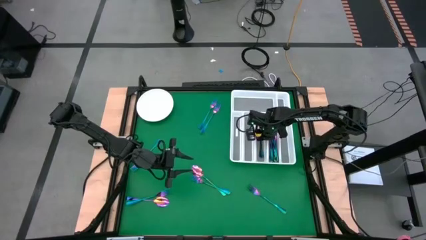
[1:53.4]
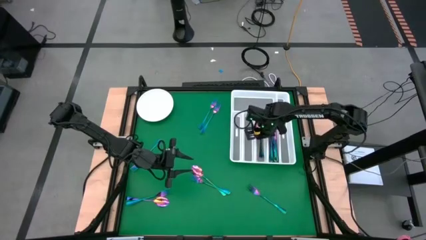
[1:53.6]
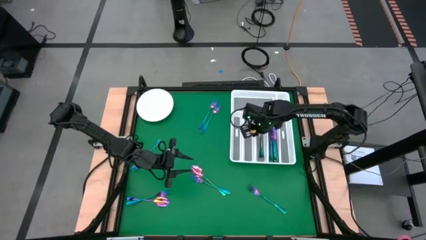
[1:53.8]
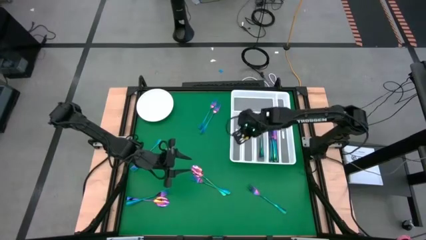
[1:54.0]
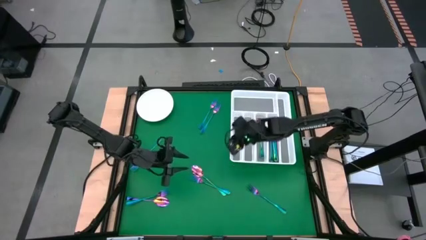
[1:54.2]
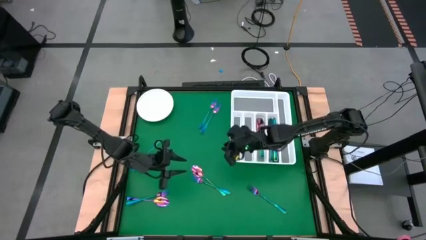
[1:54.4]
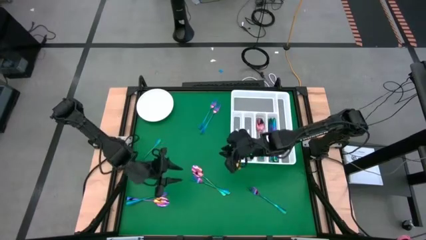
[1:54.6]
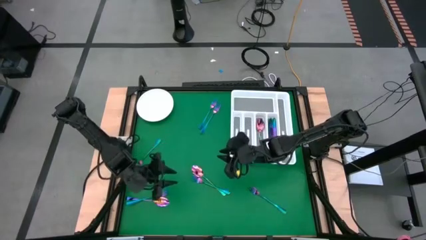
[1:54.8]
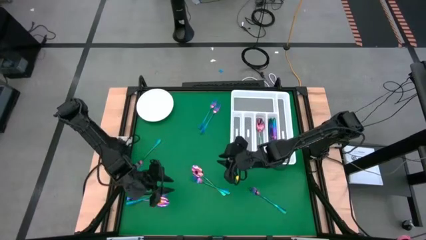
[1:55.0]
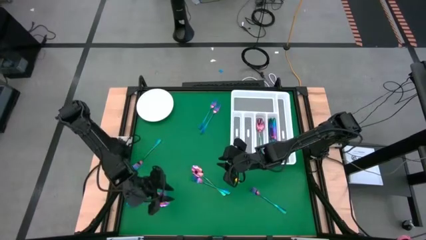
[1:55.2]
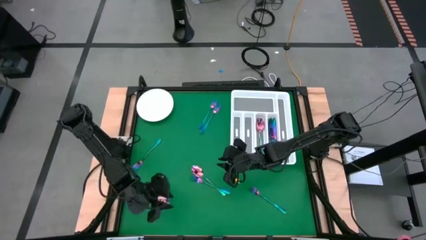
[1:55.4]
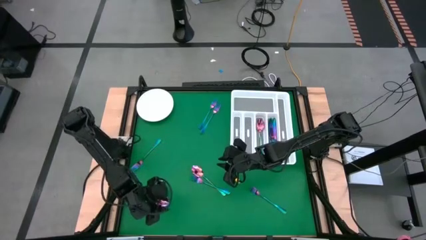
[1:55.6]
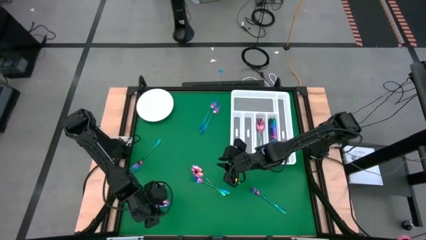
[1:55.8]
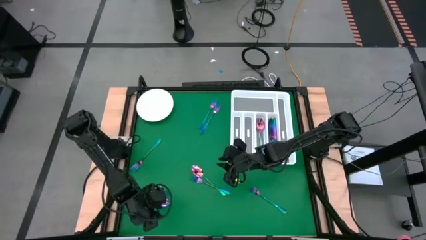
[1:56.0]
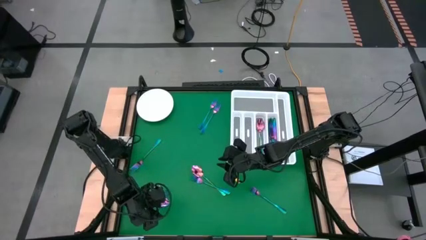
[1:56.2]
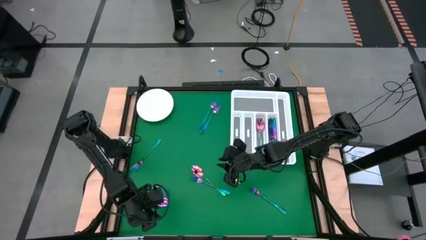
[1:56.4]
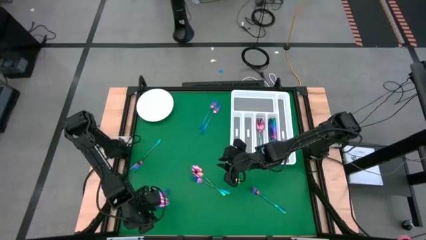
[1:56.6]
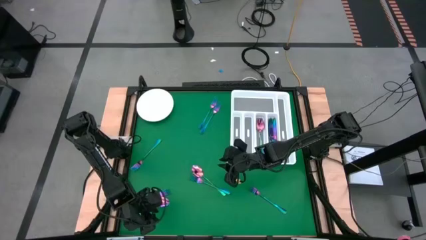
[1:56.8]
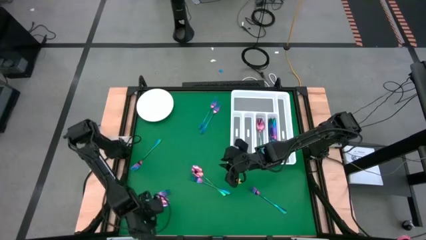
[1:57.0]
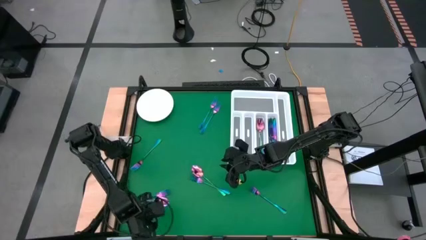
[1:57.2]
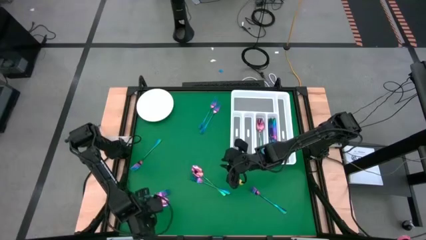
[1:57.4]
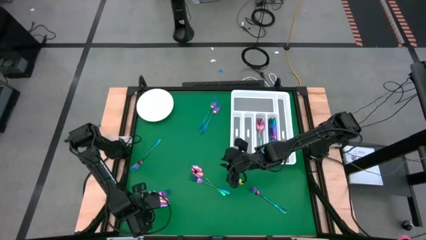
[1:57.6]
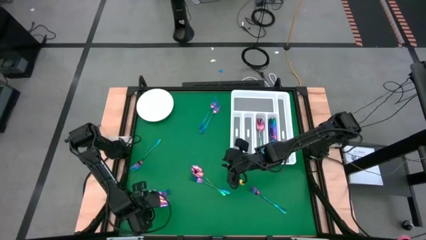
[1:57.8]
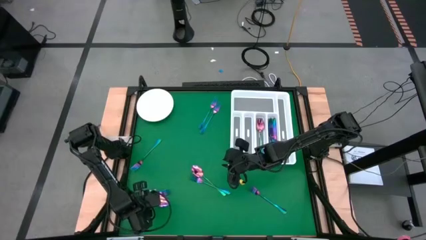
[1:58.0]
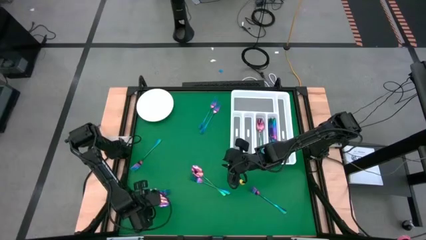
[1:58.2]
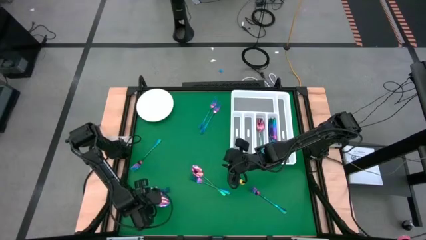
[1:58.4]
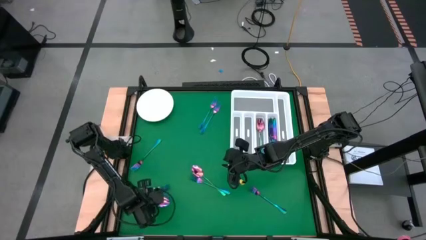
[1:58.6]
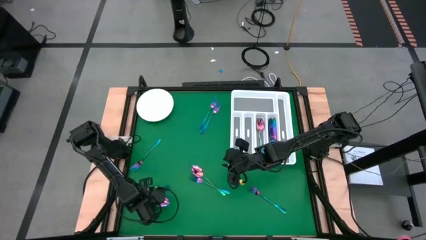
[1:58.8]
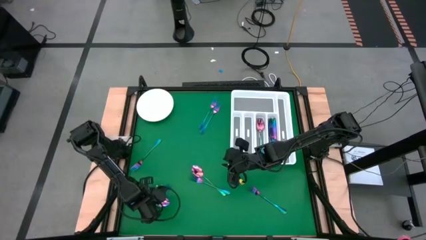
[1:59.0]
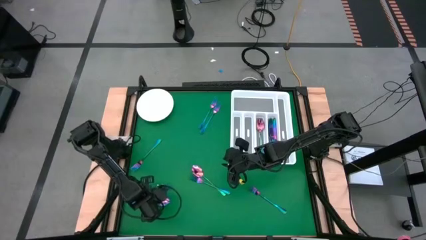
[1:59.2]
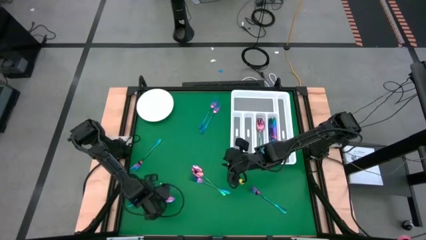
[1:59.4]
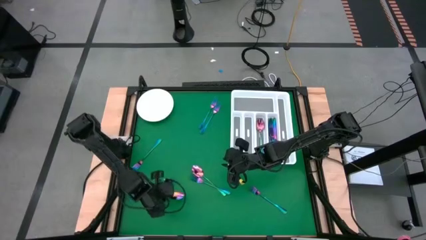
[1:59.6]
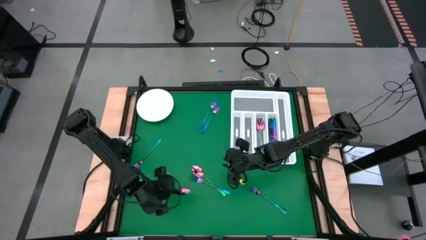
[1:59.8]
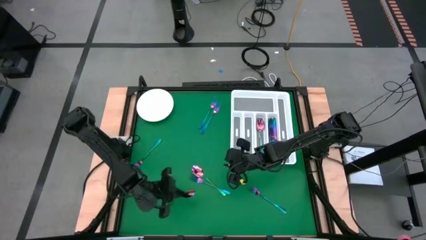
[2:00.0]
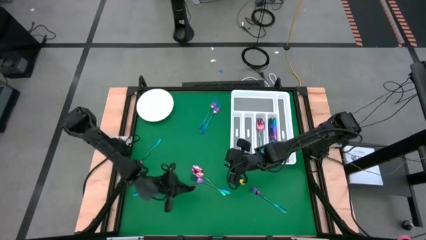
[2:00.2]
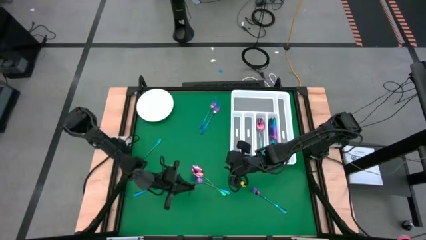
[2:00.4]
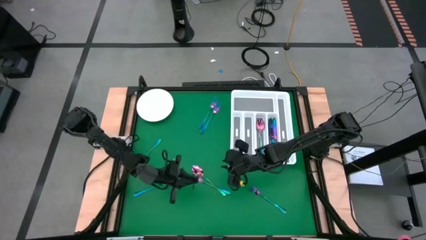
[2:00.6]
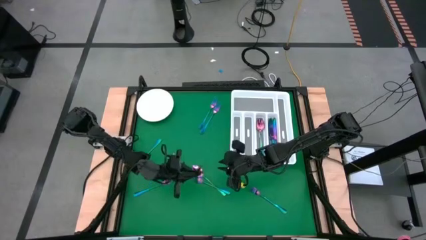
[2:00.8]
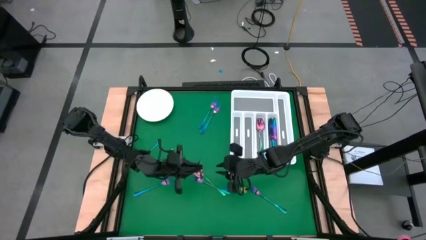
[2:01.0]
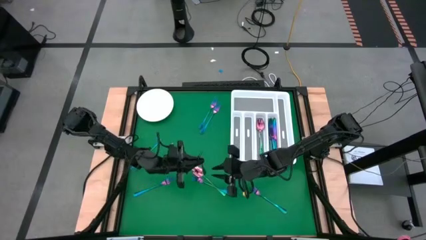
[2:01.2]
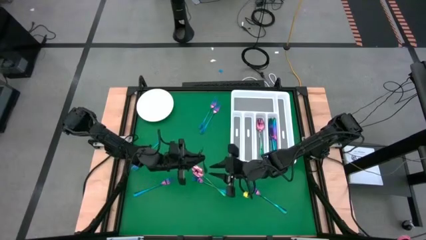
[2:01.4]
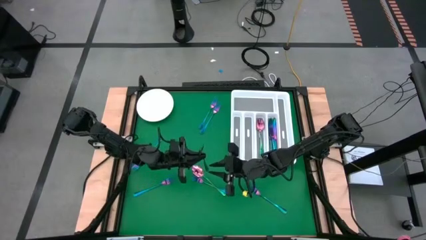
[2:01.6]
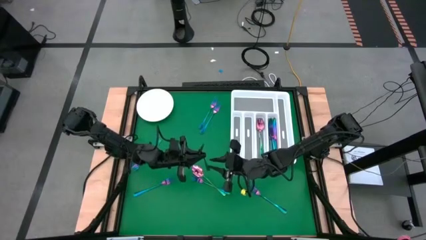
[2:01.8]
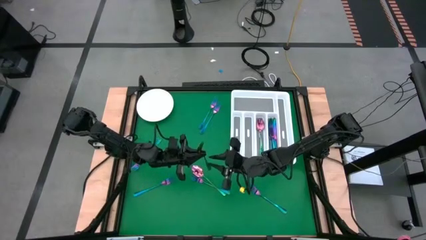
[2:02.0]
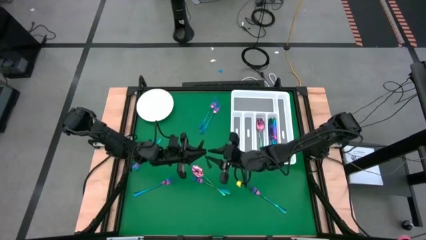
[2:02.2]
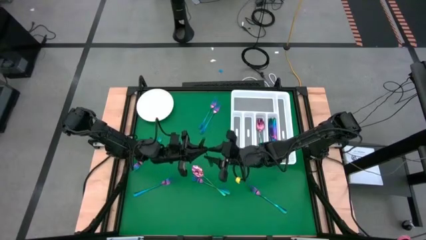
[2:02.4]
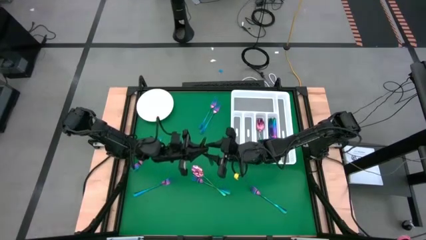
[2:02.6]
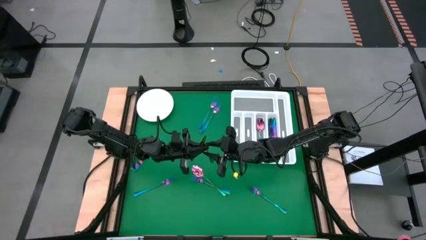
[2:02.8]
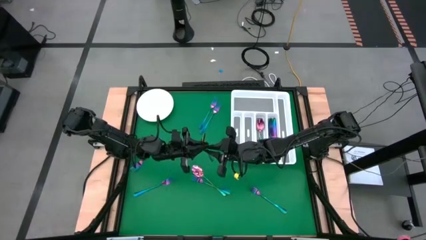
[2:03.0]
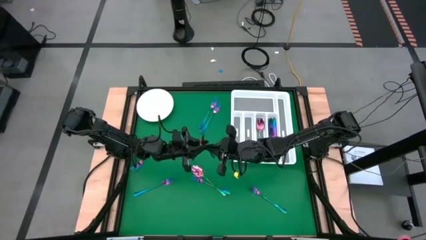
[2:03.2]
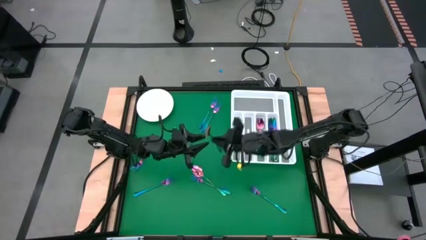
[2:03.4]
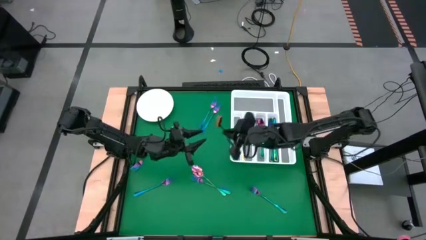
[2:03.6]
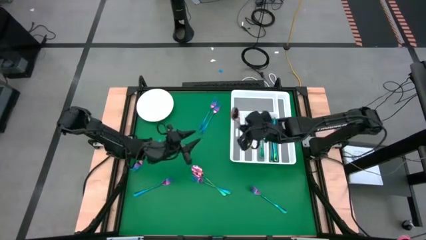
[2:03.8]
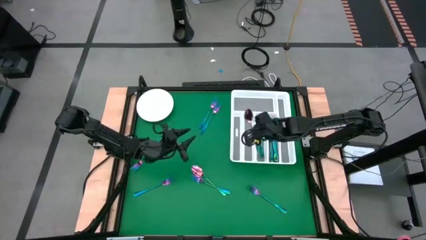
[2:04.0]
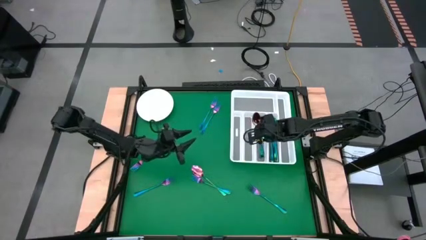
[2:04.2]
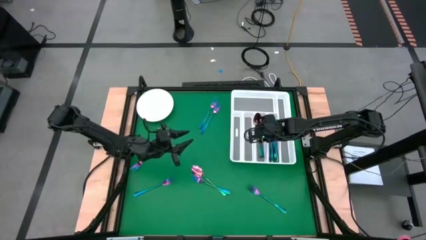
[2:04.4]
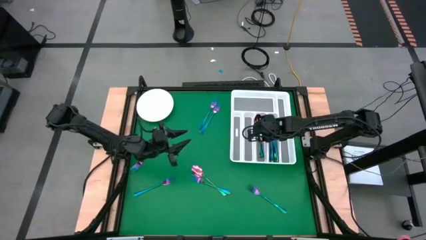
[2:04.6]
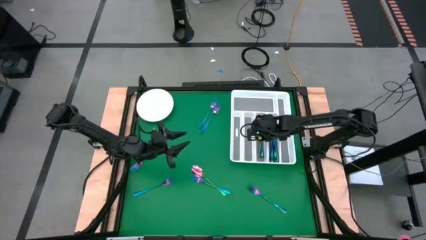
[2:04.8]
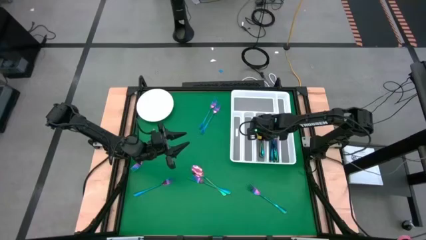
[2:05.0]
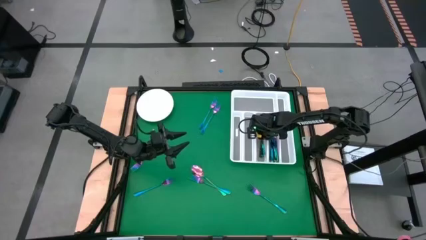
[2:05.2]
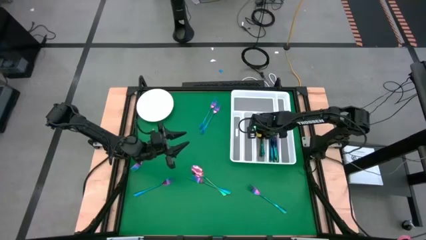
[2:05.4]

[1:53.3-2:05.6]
Task: Sort silverware
Put the blue spoon into the white cutlery tray

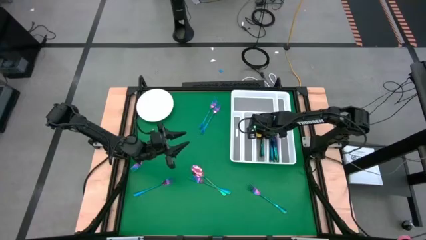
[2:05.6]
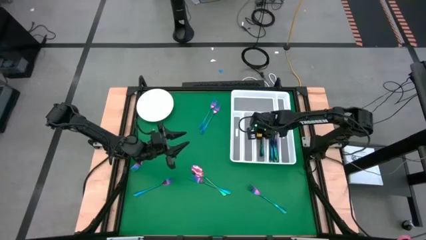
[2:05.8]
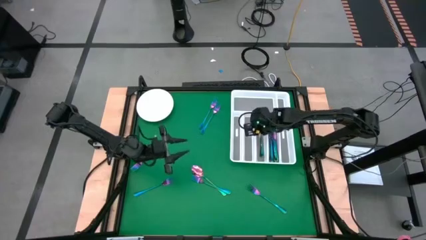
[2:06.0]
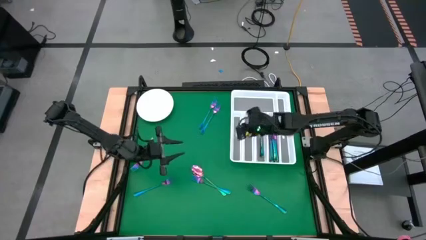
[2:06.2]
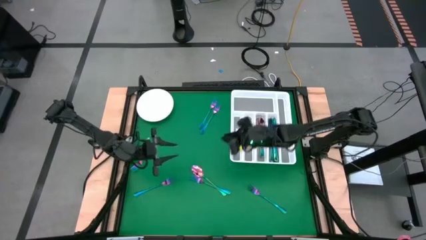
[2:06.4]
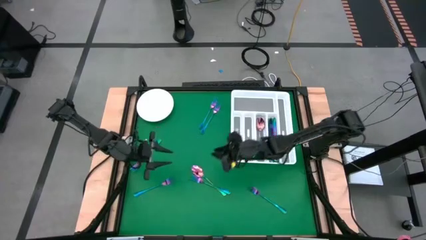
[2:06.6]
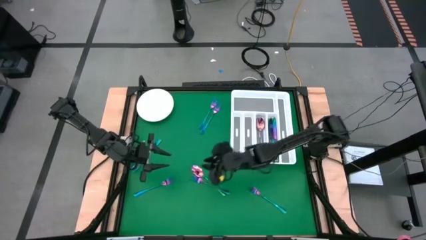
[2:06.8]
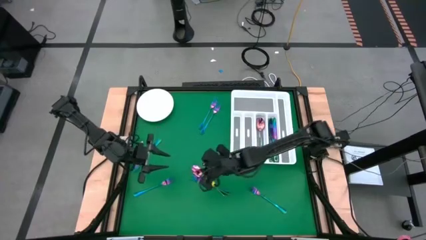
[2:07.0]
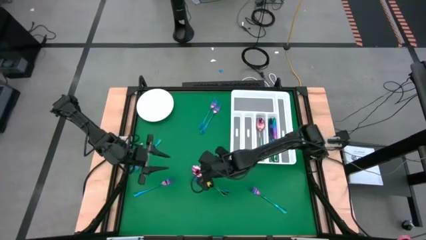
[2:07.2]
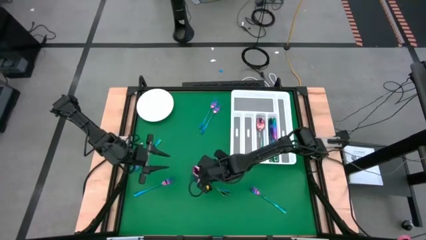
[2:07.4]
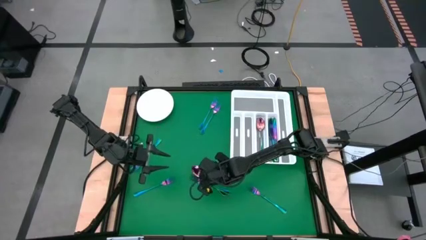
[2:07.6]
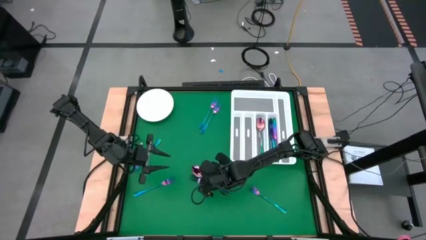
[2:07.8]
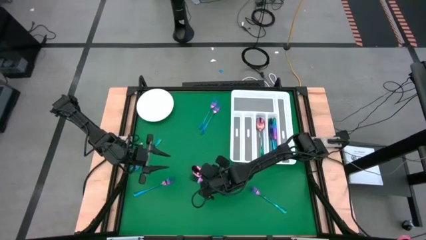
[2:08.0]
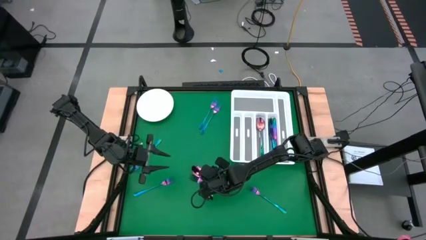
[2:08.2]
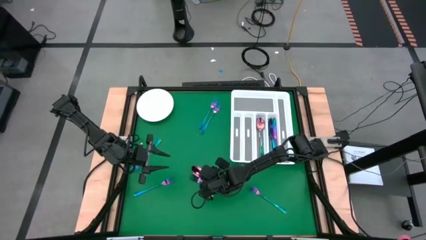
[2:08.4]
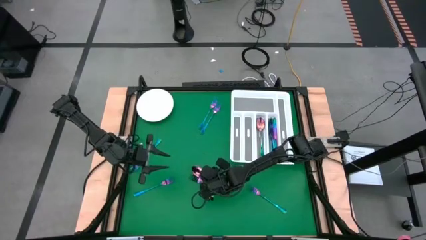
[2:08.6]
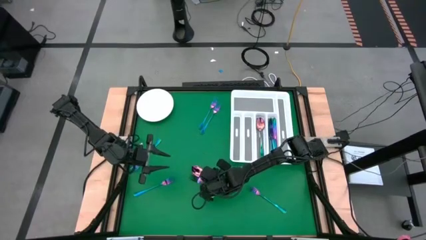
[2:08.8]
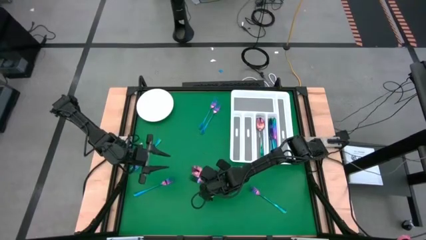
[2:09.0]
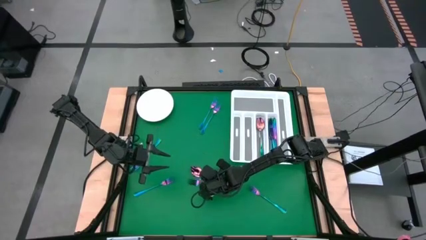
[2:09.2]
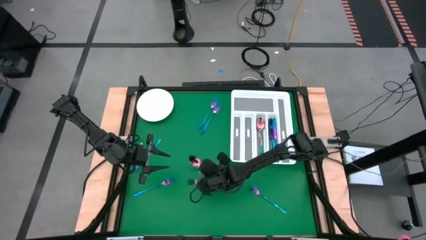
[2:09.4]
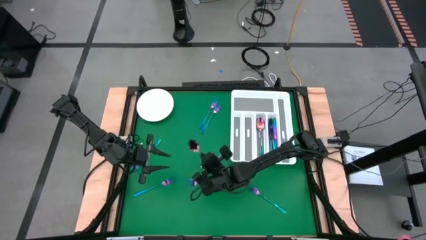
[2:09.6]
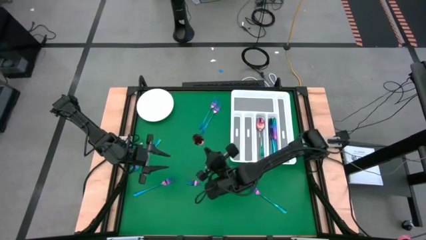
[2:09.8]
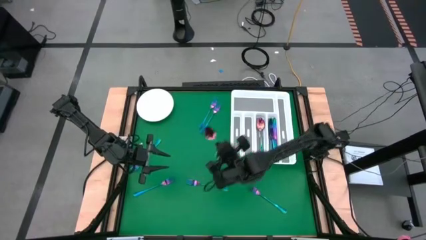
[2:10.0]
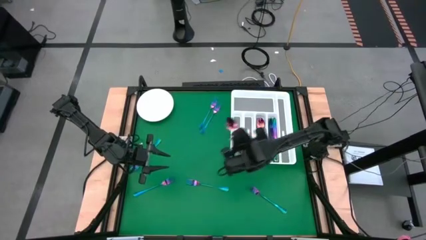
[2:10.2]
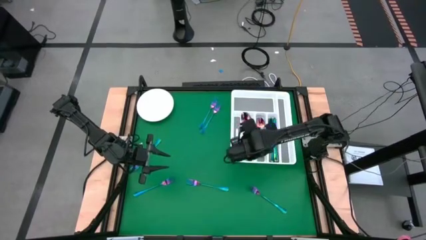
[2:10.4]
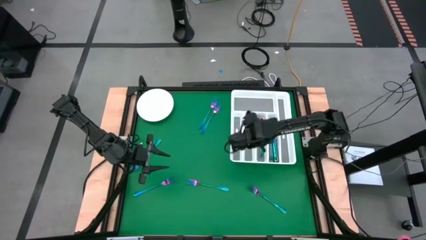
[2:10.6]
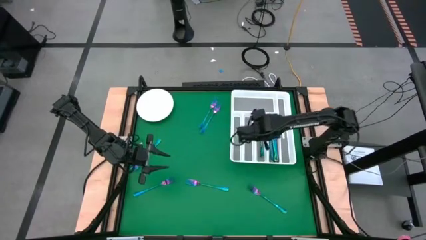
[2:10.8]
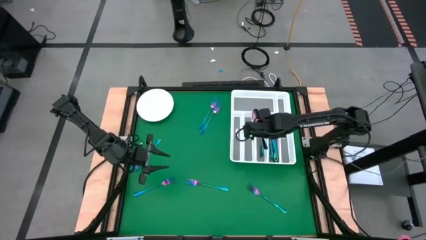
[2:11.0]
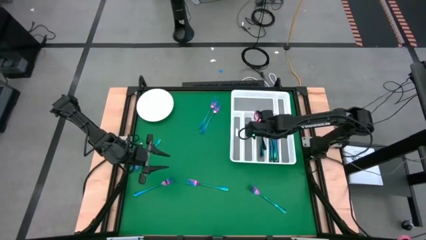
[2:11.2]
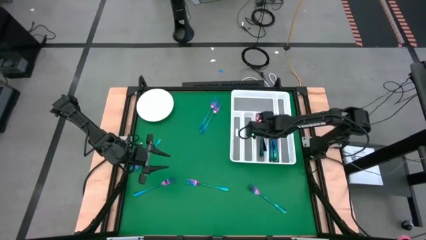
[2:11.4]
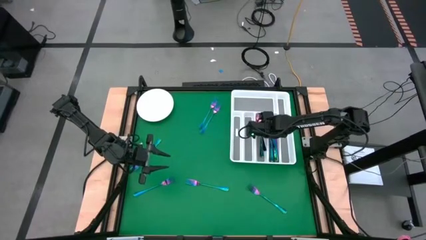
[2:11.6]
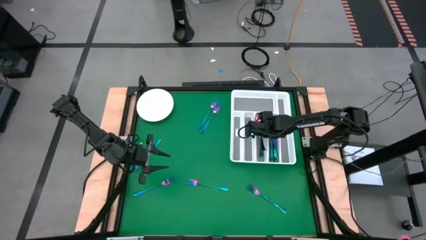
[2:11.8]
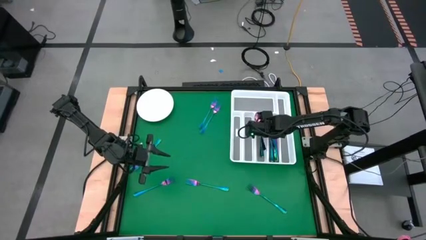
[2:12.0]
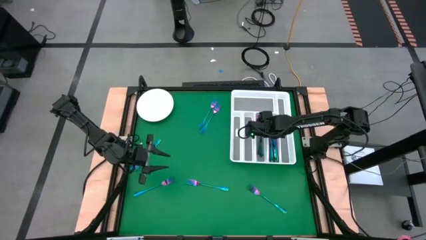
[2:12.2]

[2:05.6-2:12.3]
Put the blue spoon into the white cutlery tray
